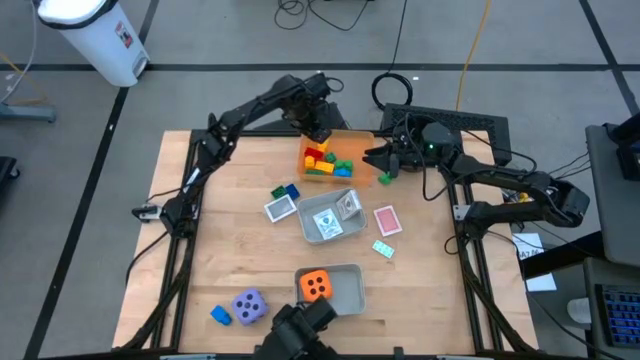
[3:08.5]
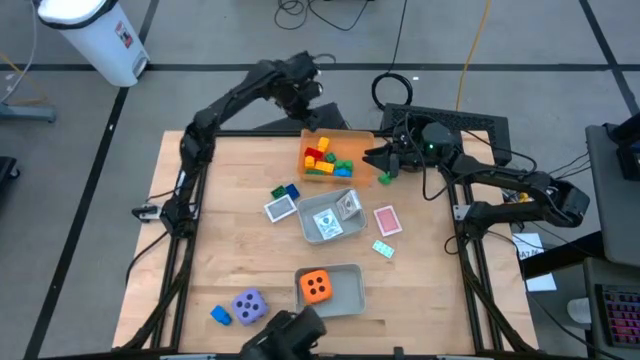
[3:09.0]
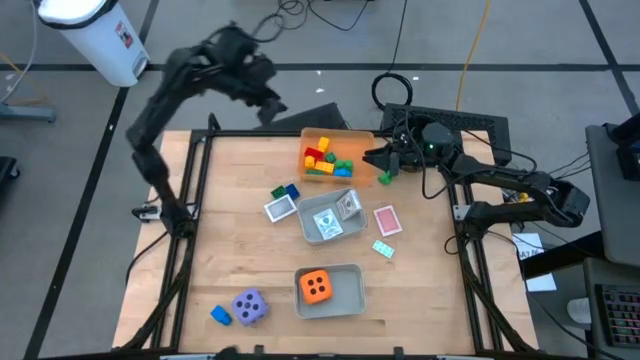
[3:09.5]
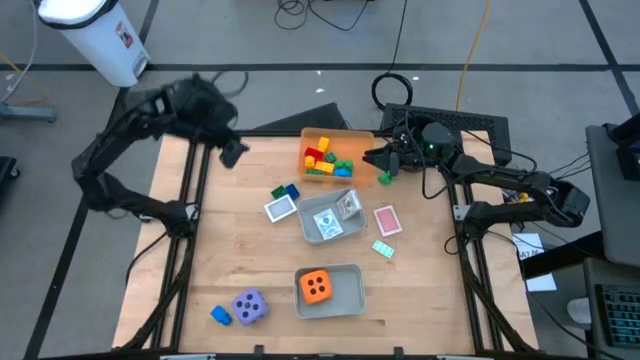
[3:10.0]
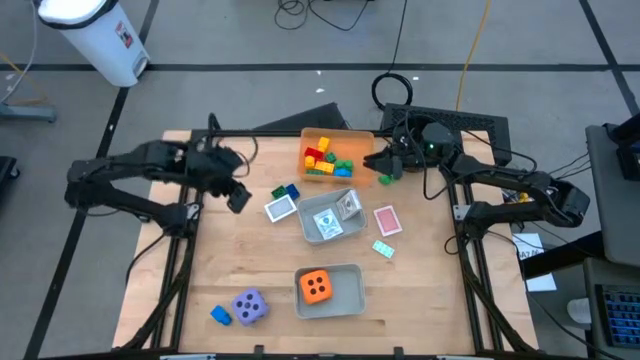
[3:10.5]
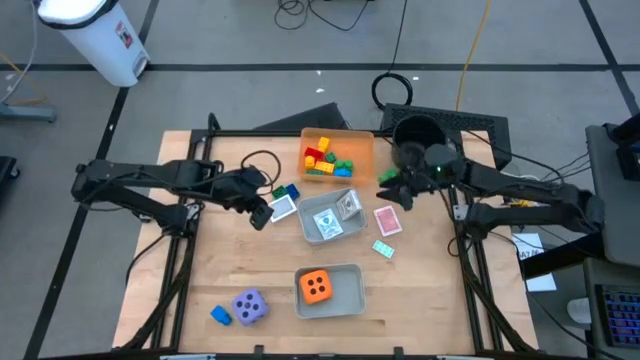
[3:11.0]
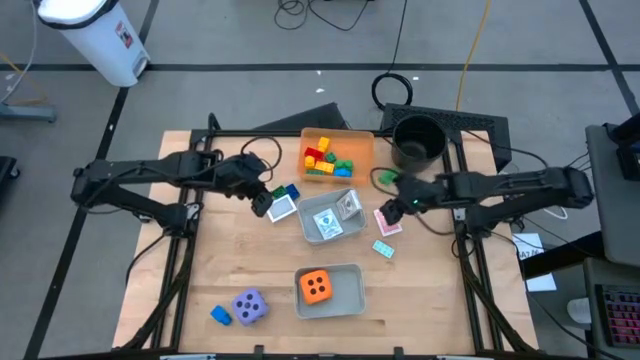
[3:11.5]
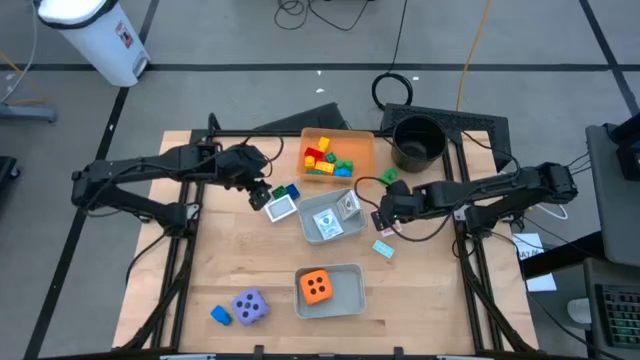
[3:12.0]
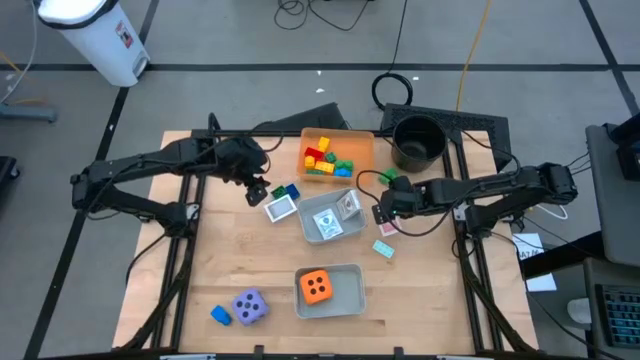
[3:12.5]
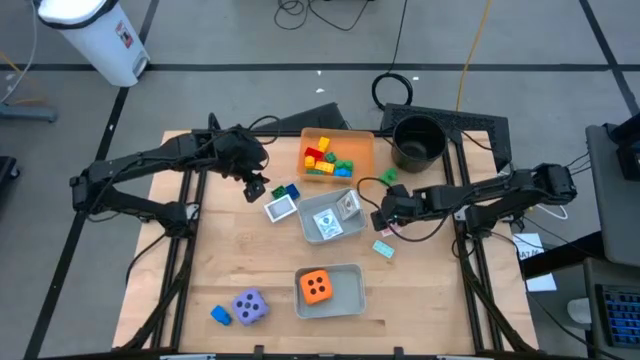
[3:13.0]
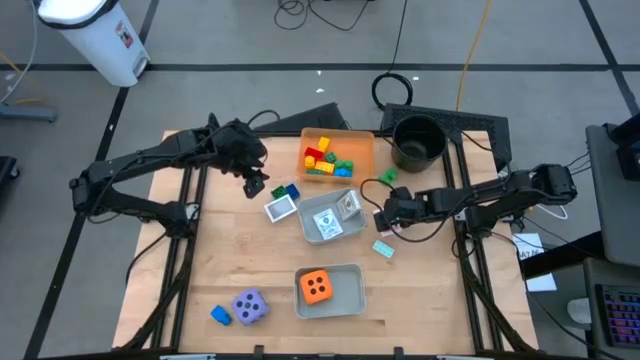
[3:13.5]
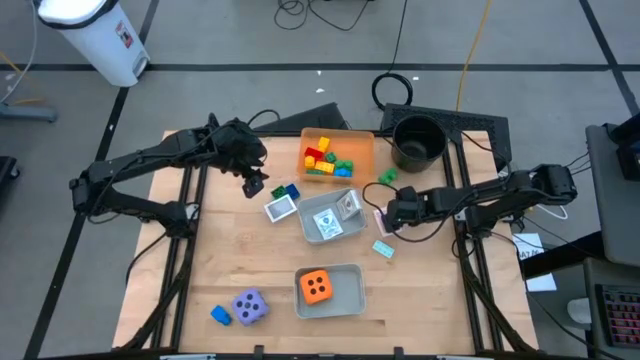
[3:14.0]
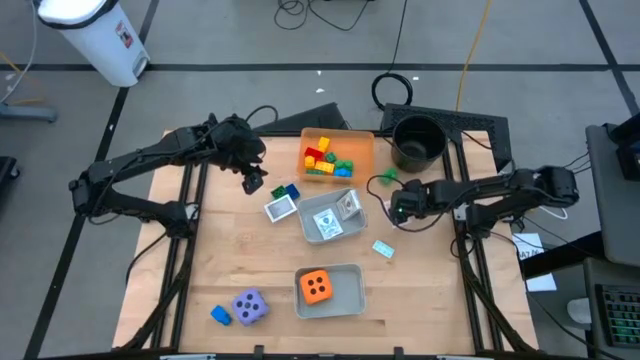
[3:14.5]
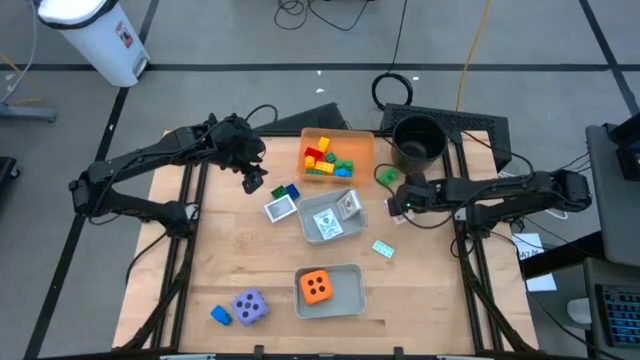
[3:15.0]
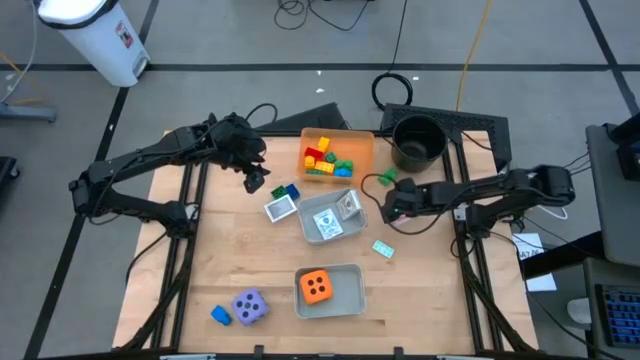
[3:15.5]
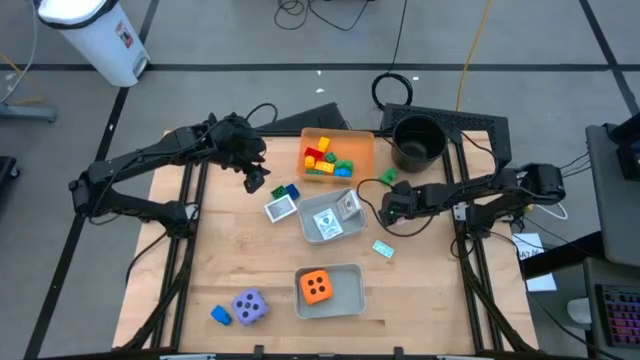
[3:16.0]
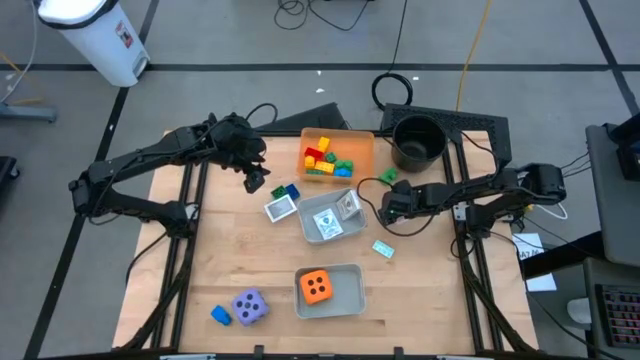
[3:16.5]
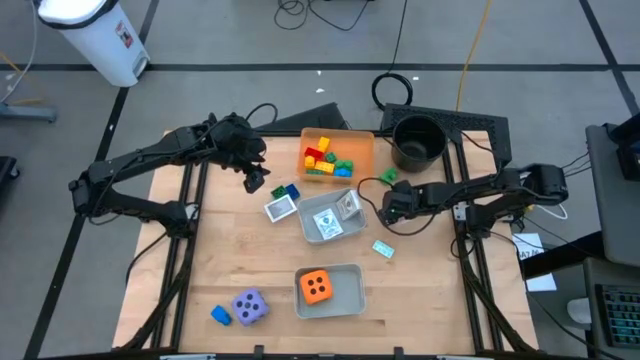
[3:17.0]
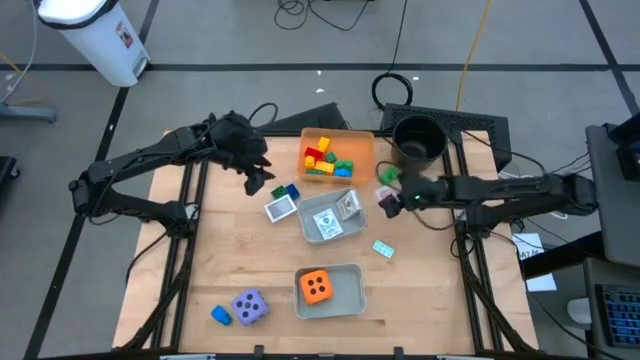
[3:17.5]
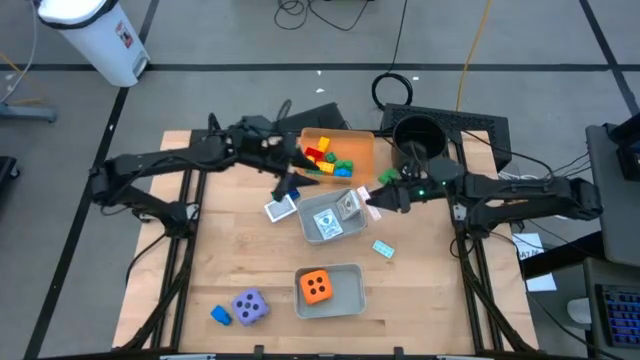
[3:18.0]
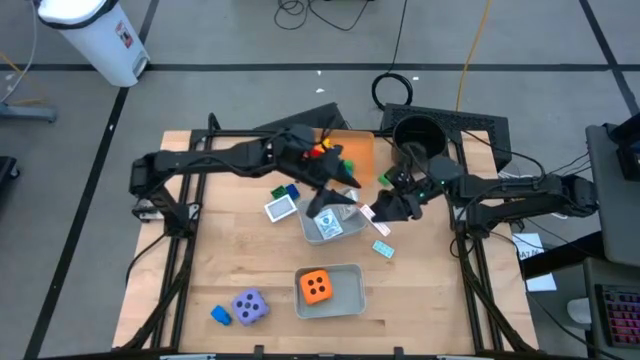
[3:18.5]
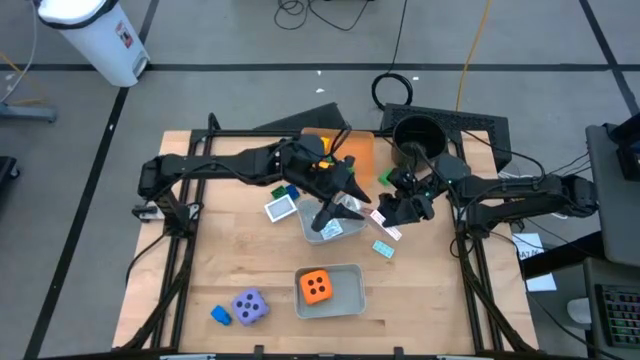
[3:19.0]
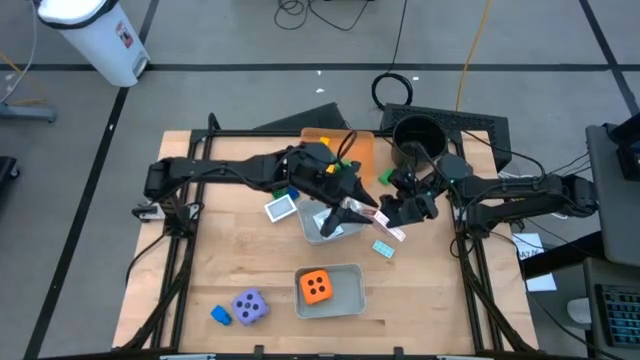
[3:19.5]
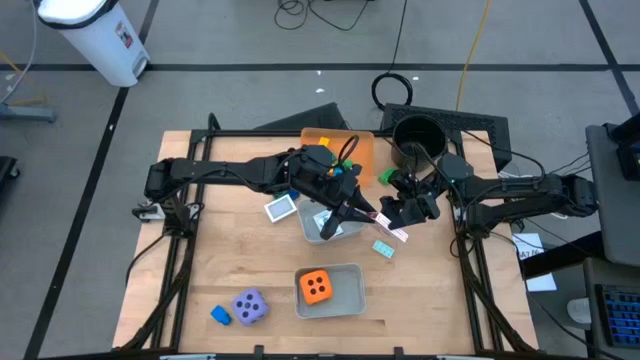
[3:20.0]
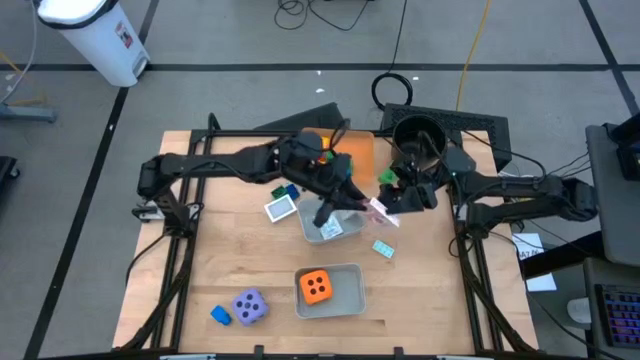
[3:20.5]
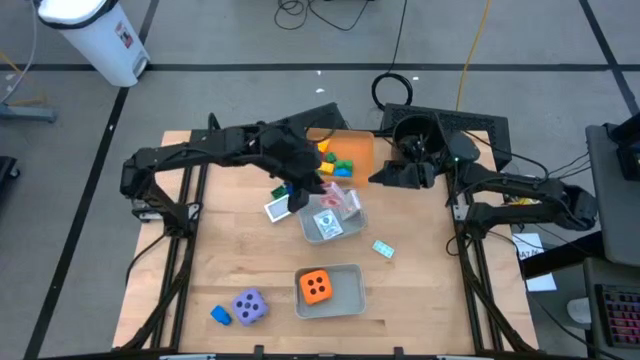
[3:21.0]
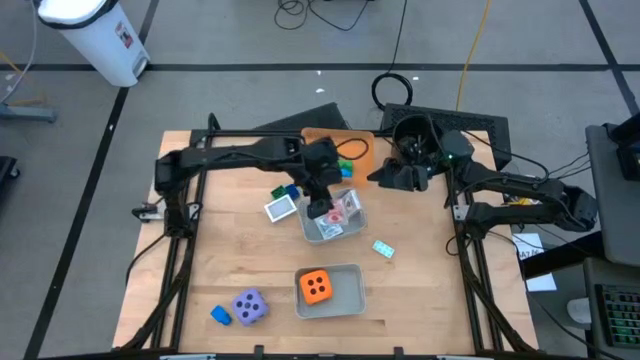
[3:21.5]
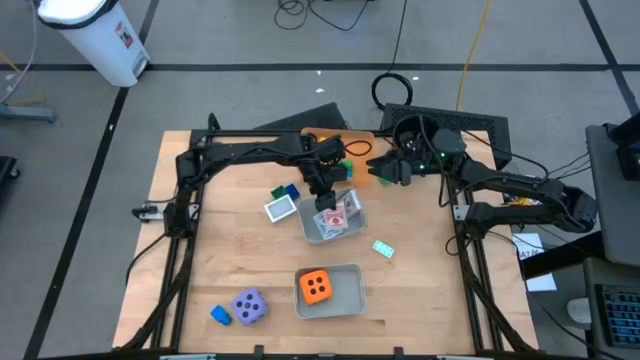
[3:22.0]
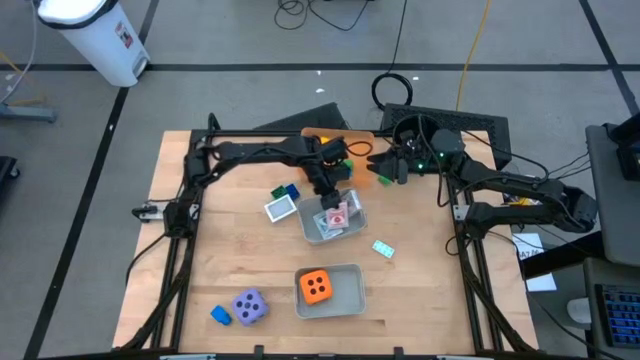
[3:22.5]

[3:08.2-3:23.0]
Task: Pick & Place Toys
Put the red deck of cards into the top gray bin

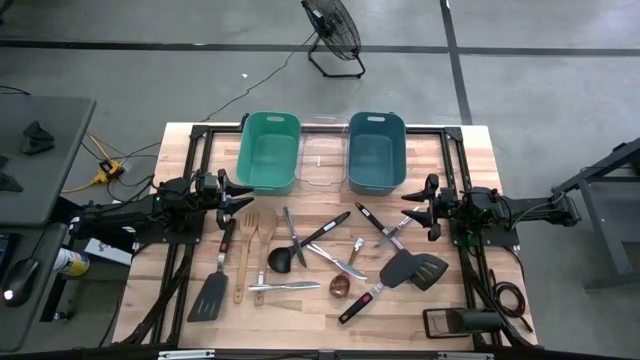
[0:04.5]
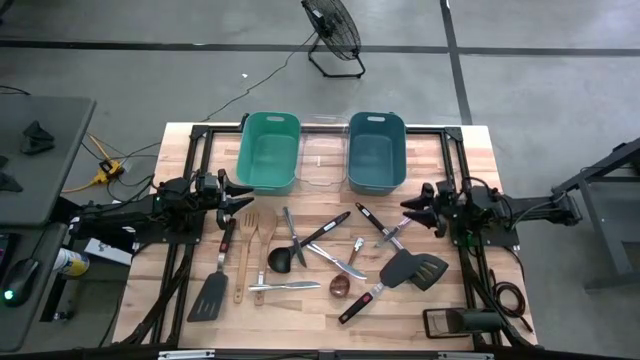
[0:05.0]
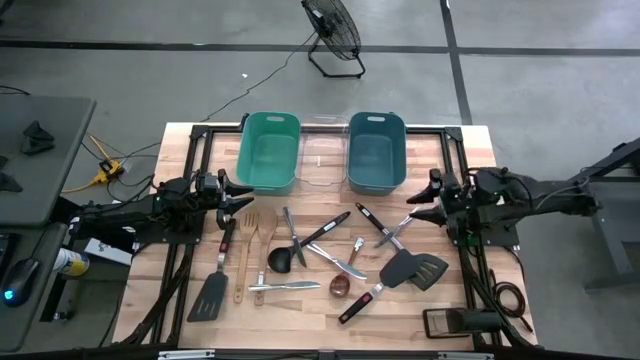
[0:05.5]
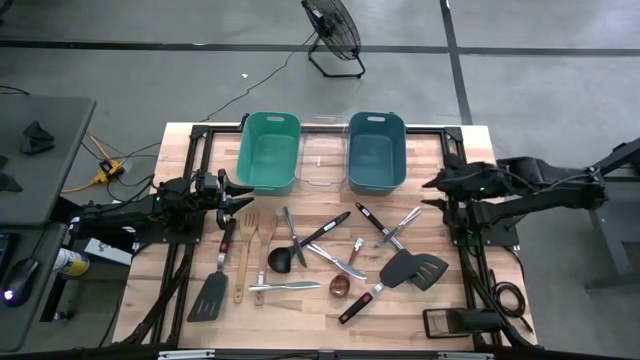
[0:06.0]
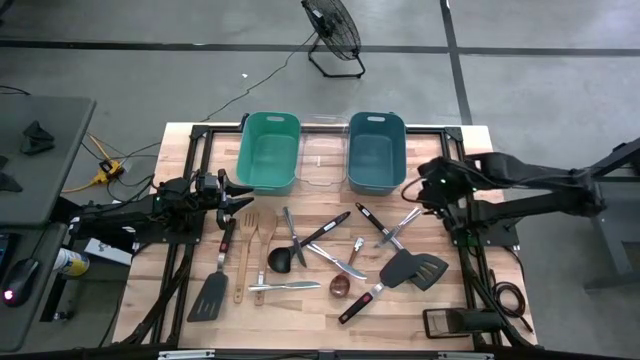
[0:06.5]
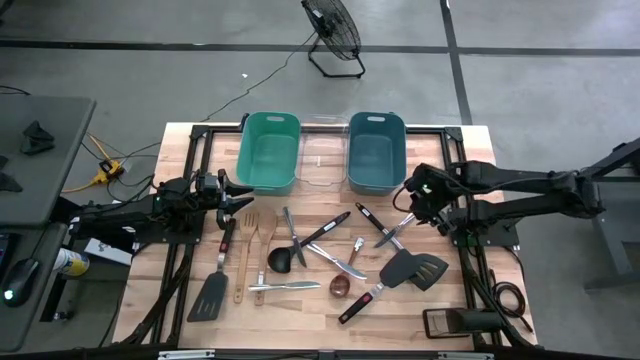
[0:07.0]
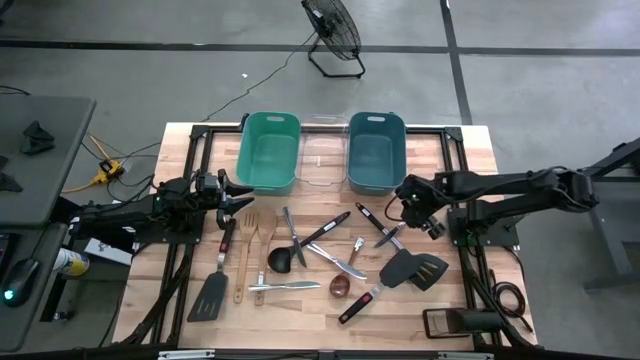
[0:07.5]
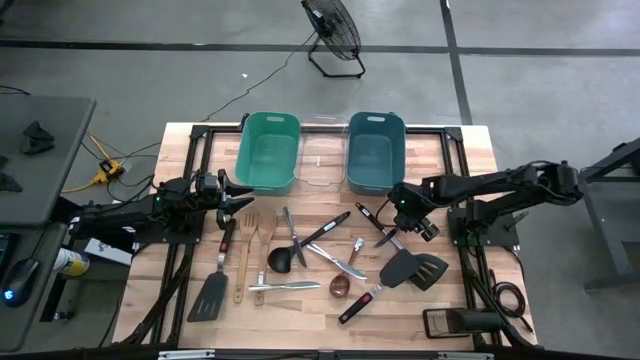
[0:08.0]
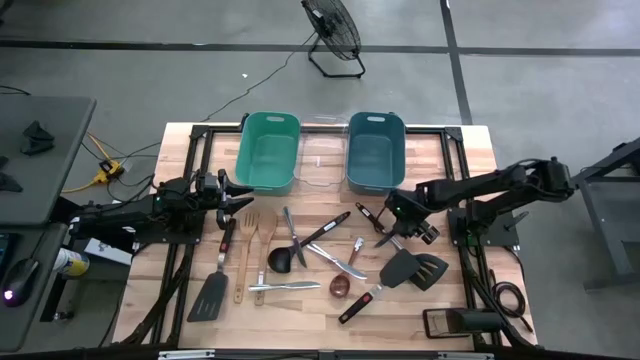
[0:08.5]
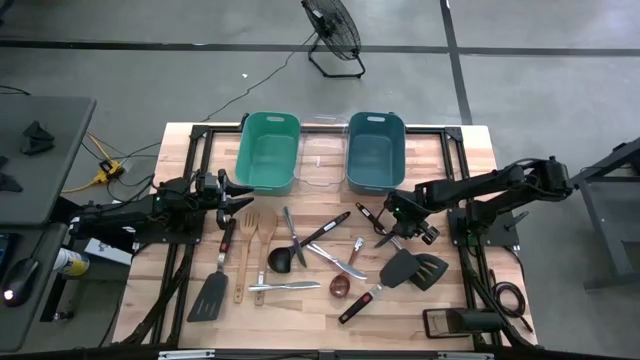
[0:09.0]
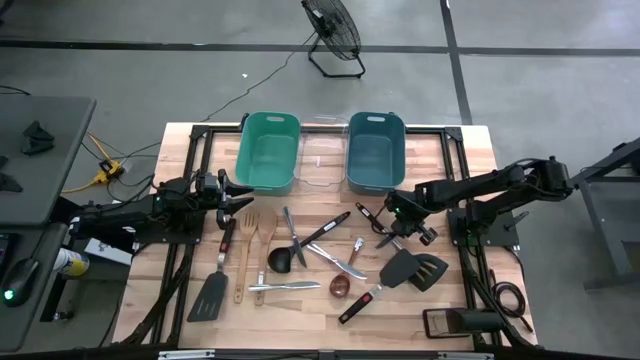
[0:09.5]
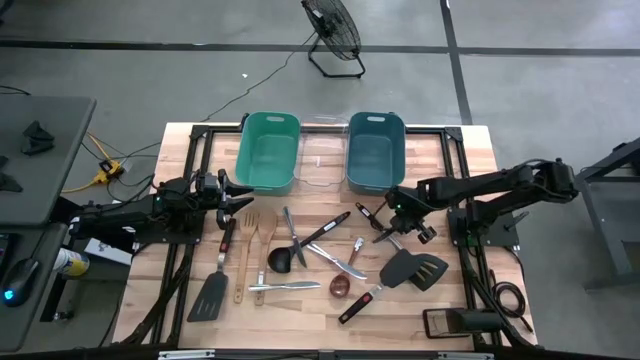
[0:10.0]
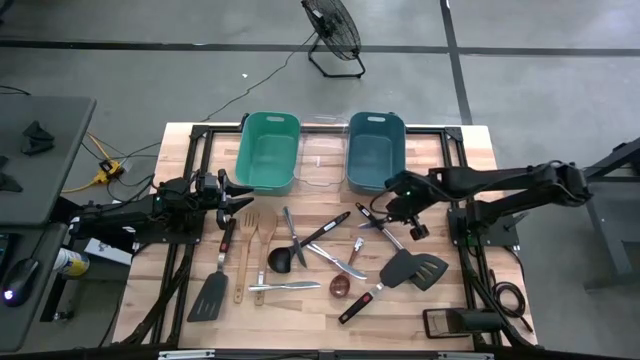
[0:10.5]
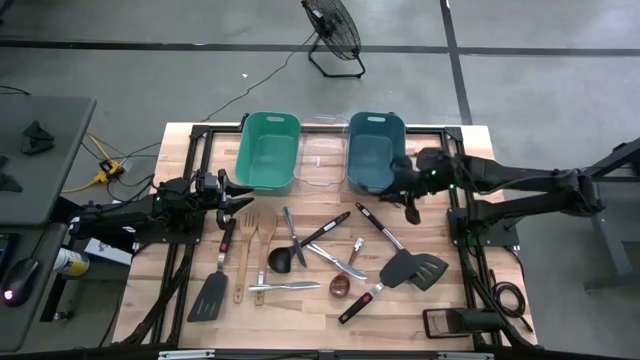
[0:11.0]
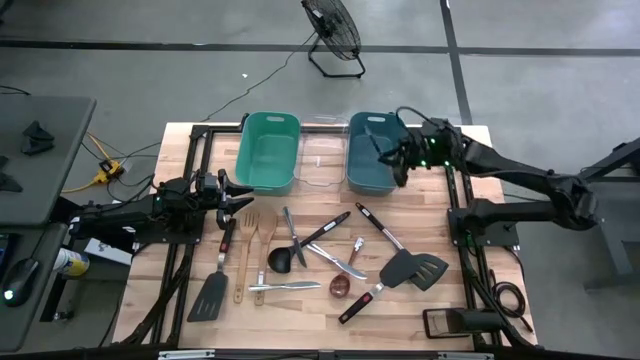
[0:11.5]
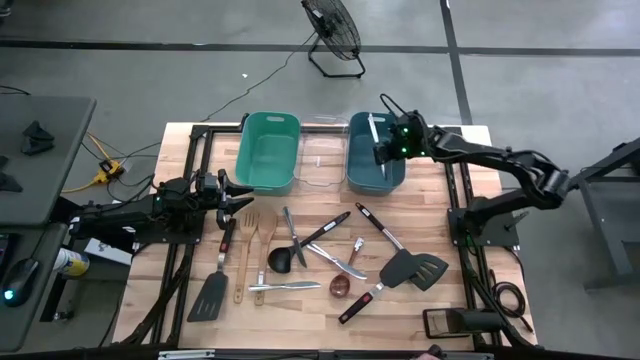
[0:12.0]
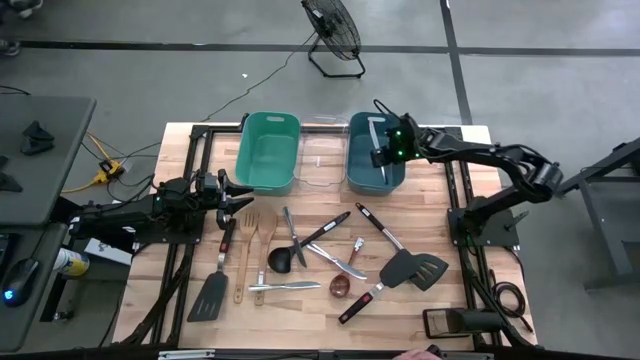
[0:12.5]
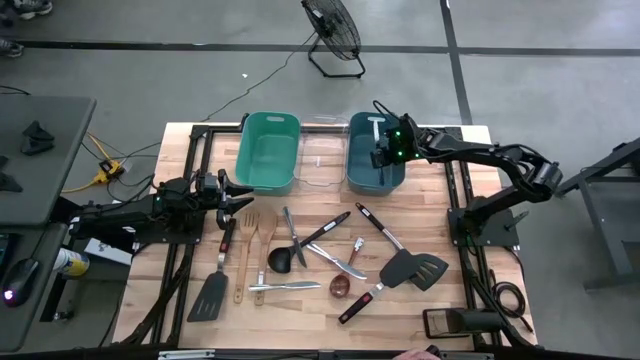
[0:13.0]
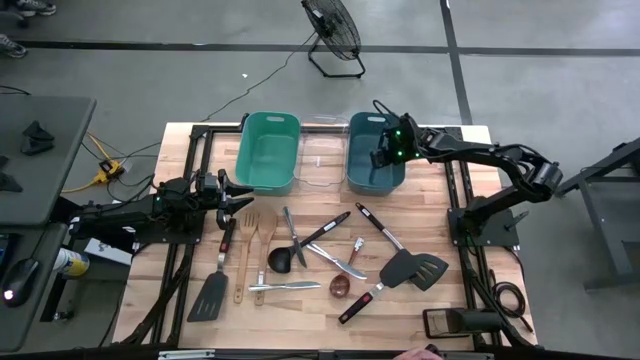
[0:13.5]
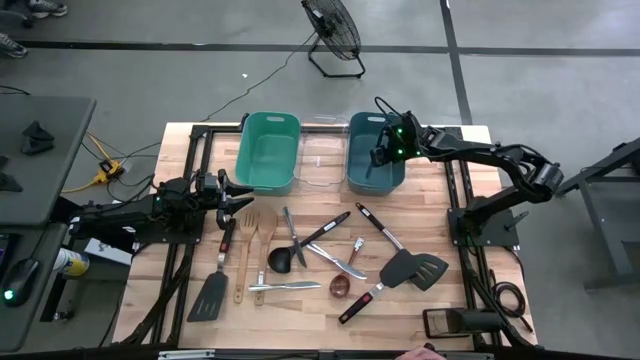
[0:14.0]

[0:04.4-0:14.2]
Task: Pick & Place Kitchen Items
Put the silver table knife into the blue bin
